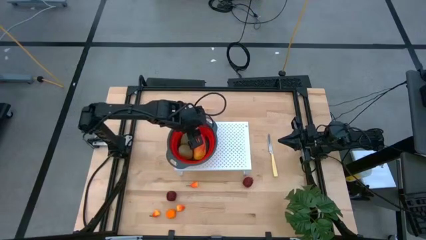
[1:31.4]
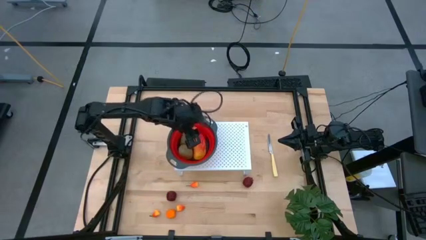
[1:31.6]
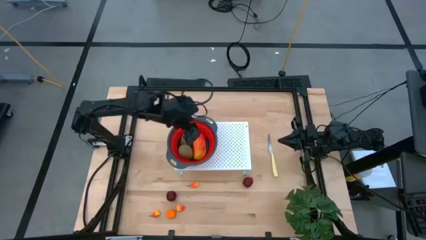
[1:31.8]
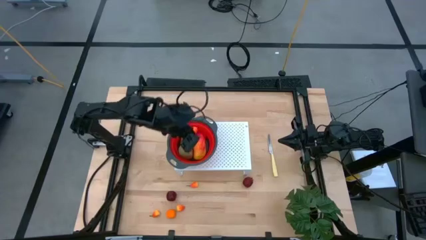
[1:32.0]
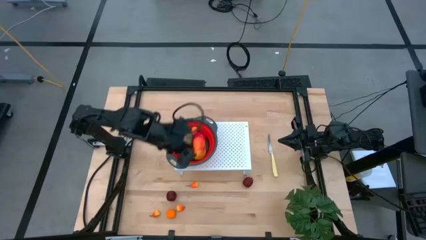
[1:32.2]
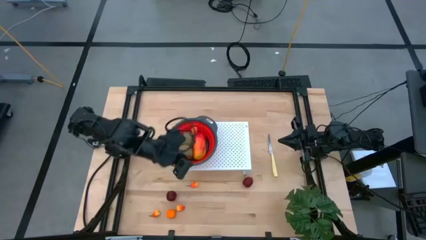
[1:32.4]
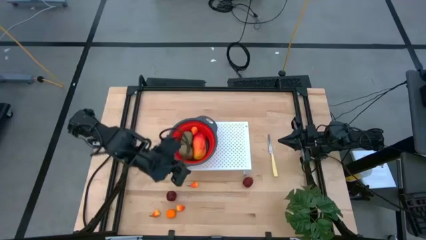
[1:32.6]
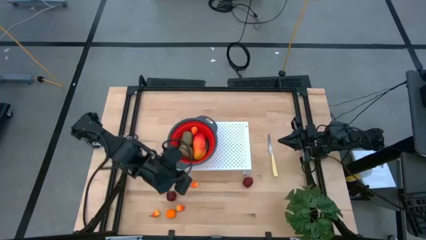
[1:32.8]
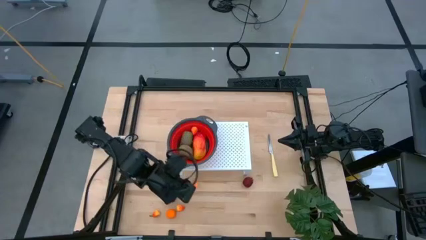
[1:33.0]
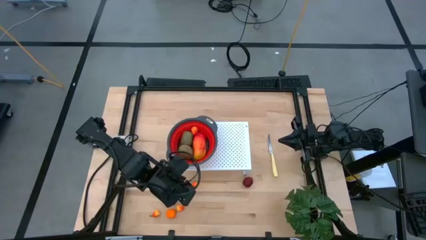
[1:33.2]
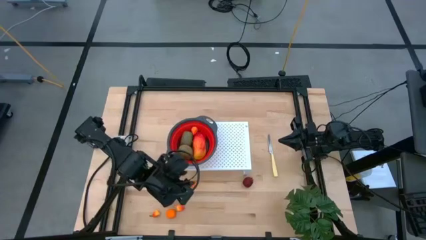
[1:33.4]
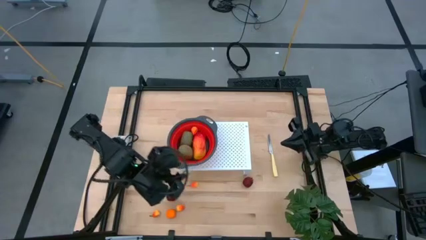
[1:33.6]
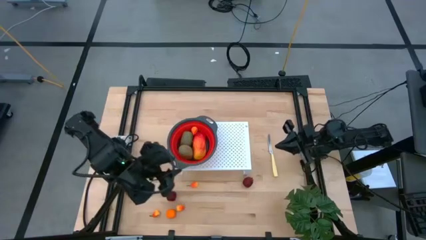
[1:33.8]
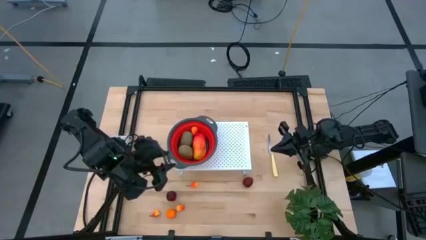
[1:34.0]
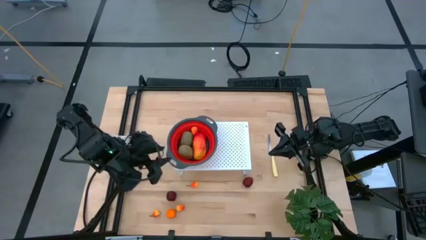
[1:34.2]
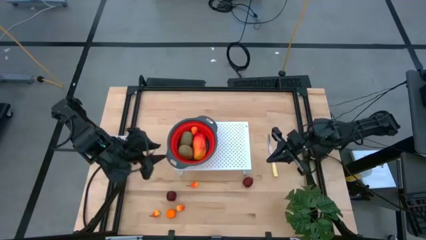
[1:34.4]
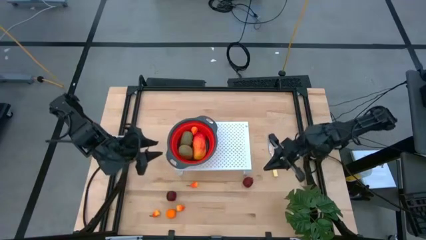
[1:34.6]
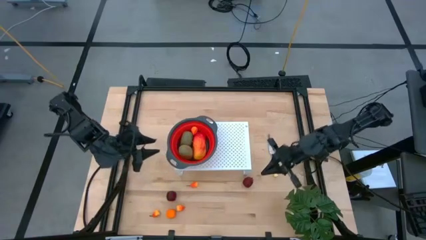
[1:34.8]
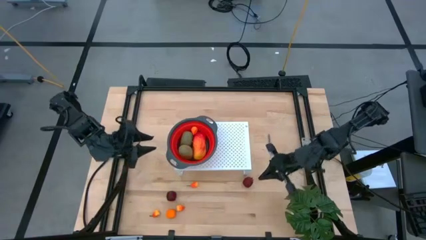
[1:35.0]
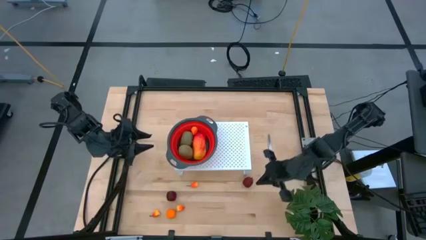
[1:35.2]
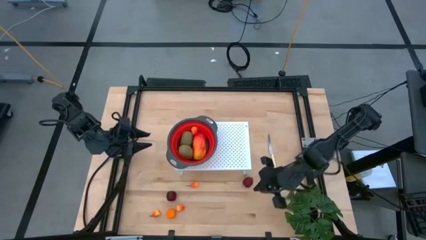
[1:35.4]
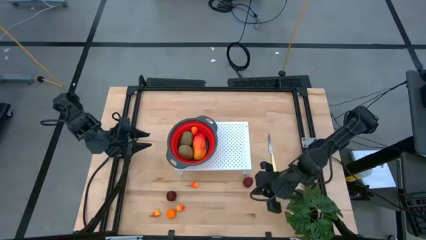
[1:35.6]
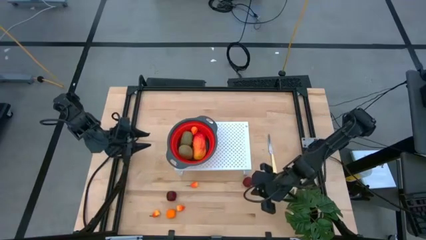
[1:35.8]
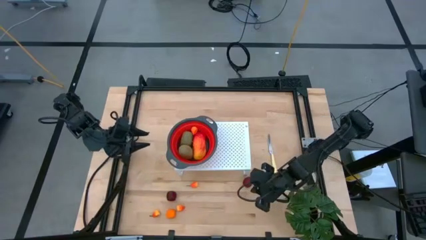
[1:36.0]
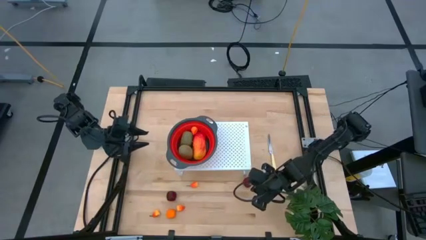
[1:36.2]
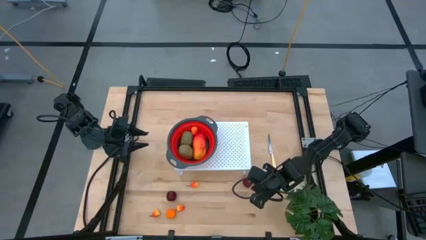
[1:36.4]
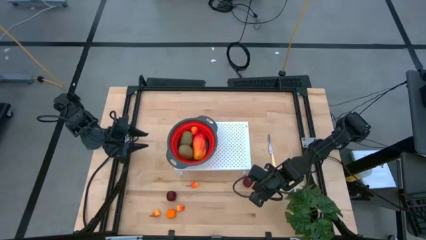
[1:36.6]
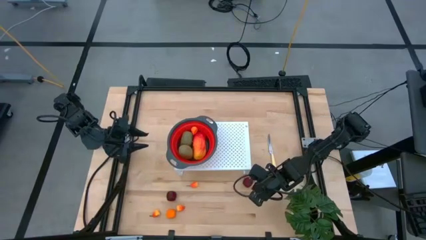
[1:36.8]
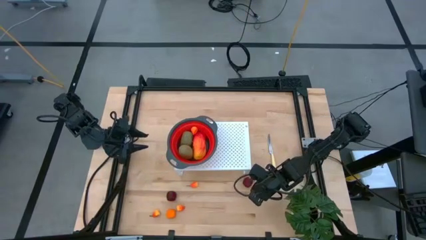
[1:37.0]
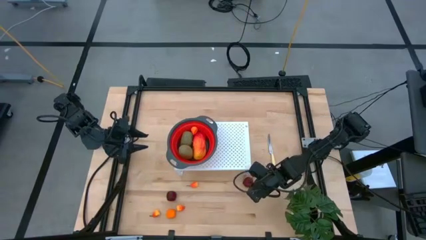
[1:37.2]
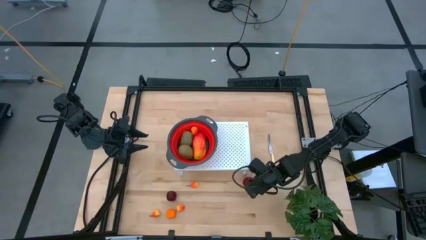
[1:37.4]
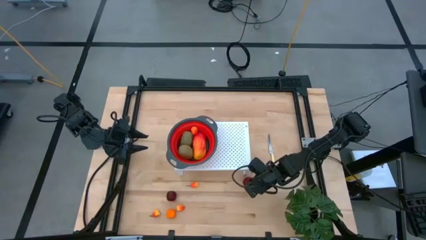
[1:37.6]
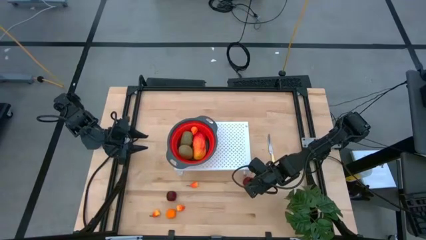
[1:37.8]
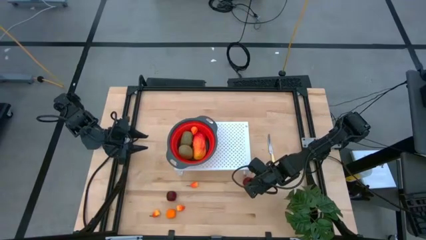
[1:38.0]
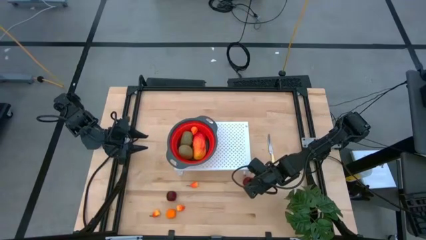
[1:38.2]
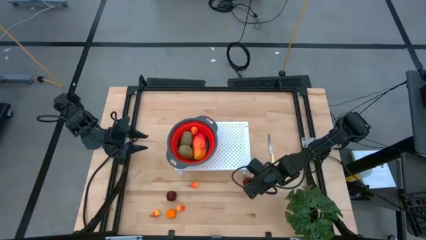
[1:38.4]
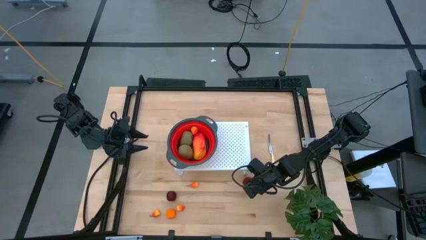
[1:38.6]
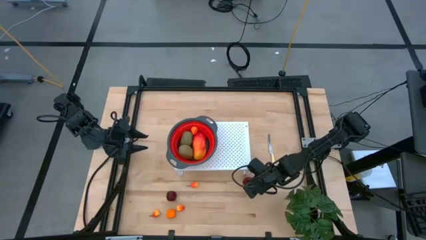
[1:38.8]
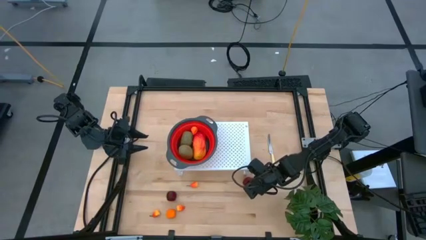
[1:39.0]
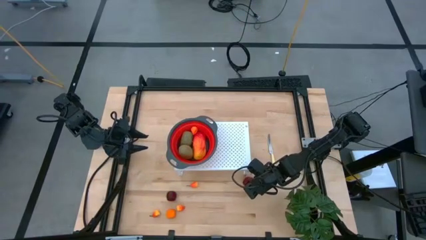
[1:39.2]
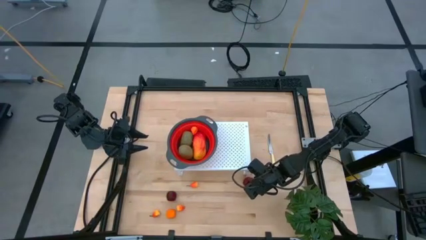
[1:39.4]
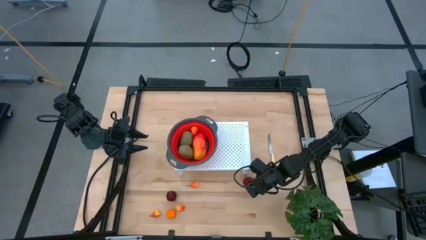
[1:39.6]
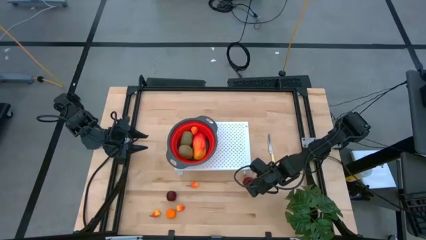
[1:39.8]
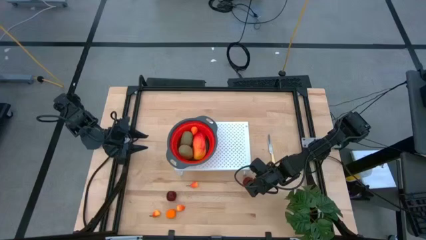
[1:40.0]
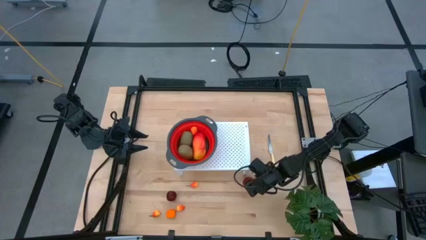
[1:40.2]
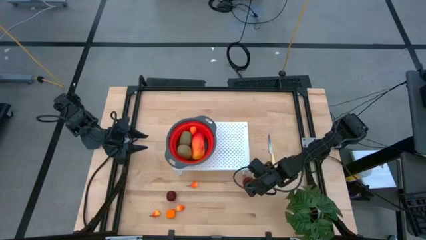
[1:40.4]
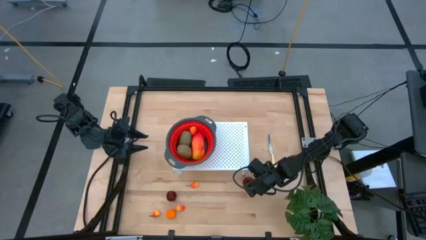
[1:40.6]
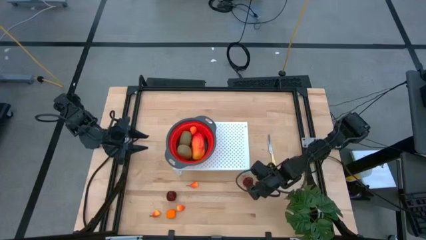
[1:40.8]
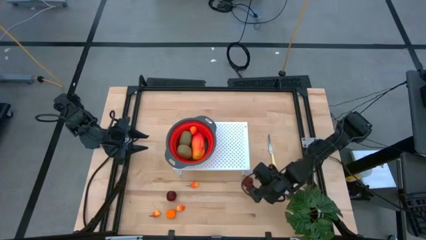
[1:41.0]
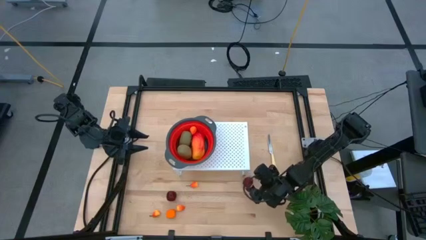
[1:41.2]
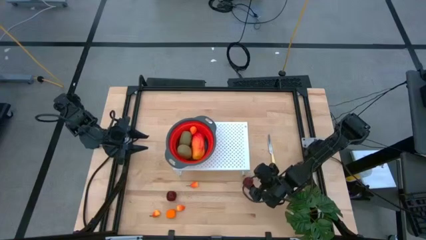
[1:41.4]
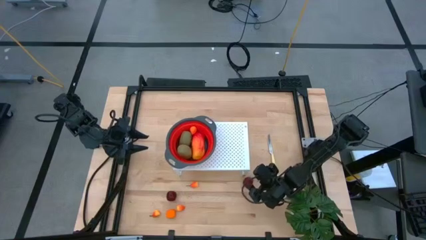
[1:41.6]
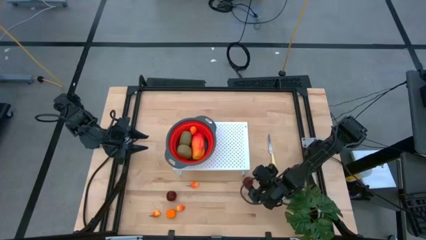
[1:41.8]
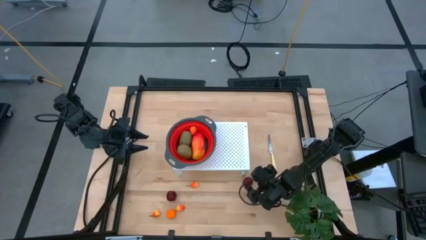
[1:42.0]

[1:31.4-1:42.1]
Task: Pick & Place Fruit
Put the red pomegranate into the red strainer bowl on the shelf
